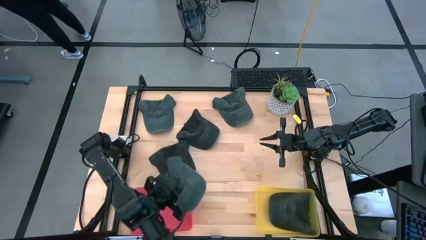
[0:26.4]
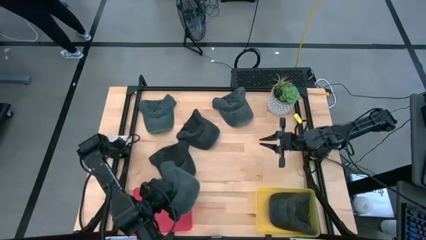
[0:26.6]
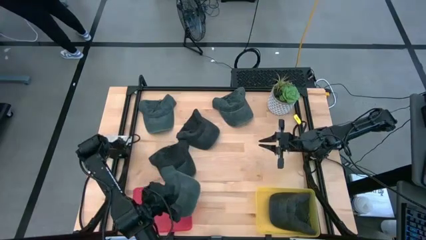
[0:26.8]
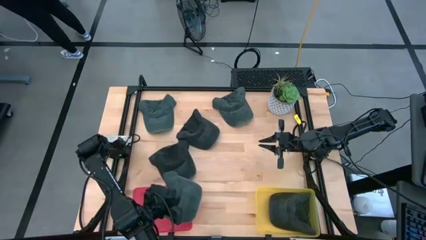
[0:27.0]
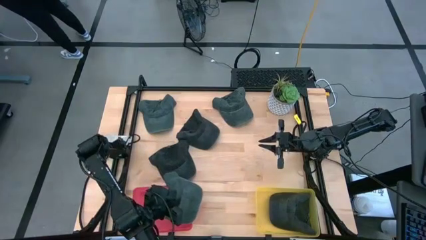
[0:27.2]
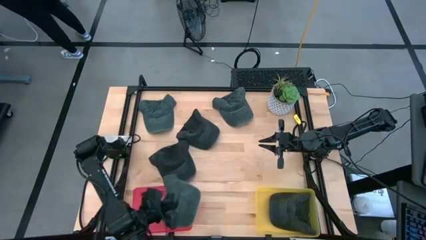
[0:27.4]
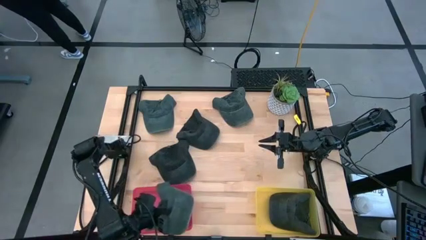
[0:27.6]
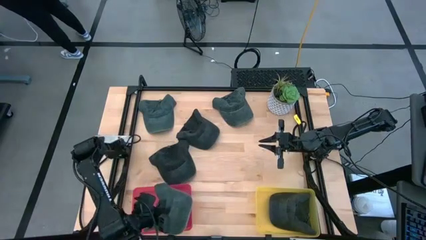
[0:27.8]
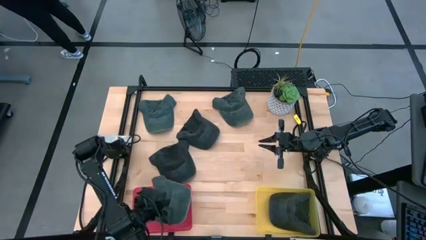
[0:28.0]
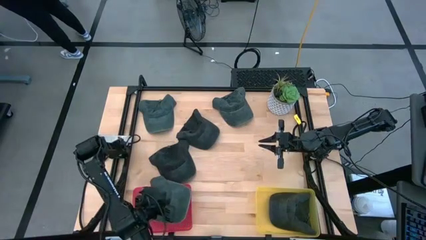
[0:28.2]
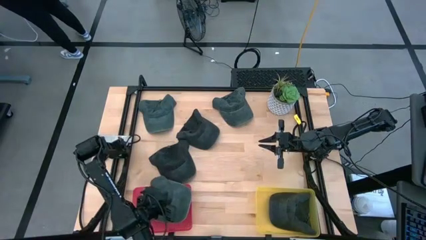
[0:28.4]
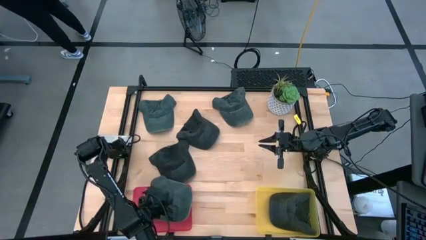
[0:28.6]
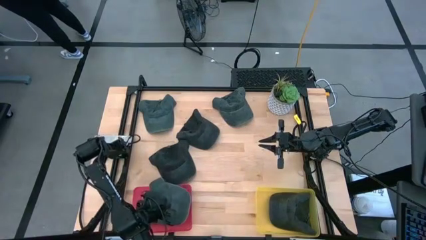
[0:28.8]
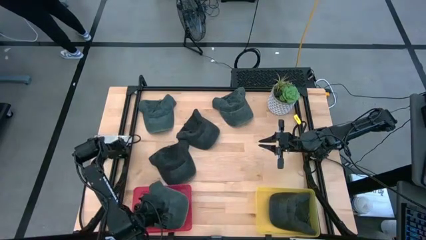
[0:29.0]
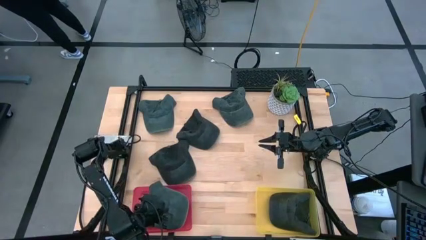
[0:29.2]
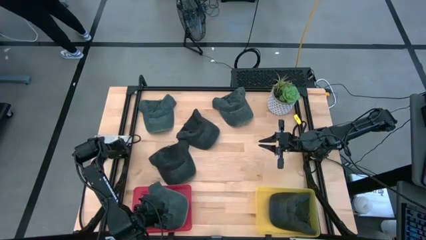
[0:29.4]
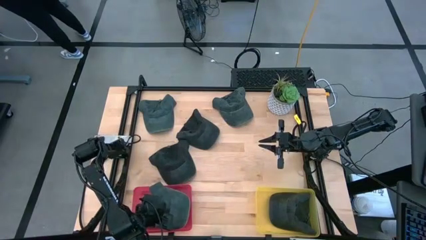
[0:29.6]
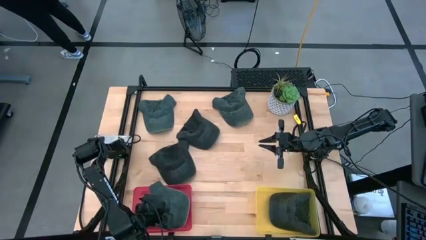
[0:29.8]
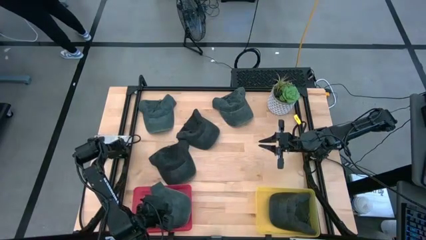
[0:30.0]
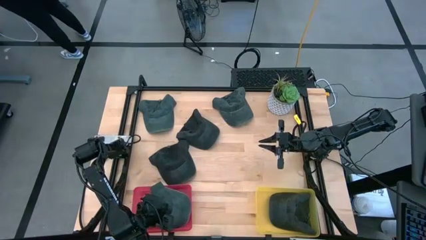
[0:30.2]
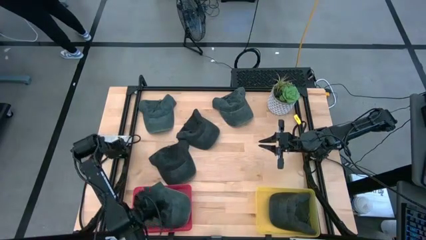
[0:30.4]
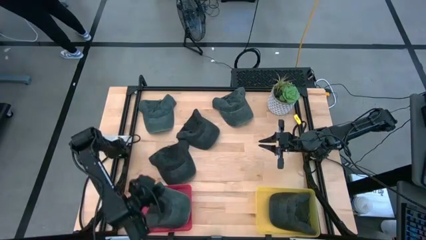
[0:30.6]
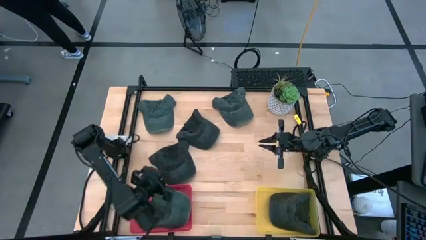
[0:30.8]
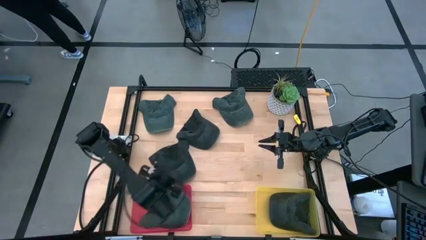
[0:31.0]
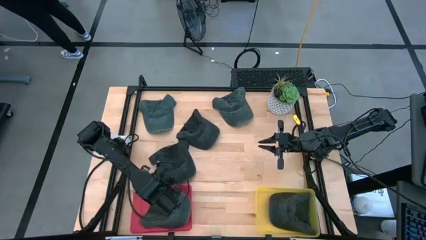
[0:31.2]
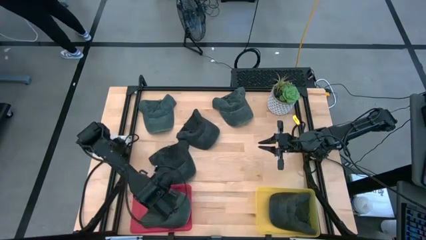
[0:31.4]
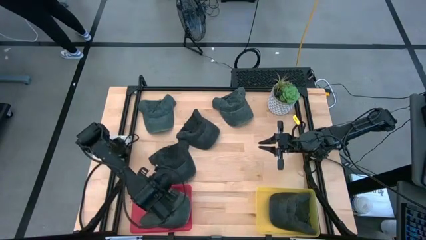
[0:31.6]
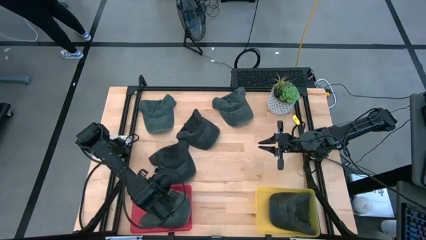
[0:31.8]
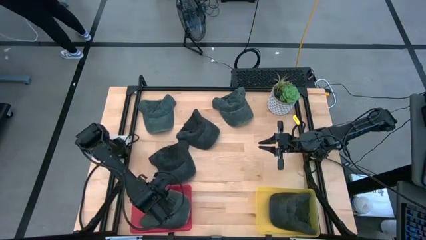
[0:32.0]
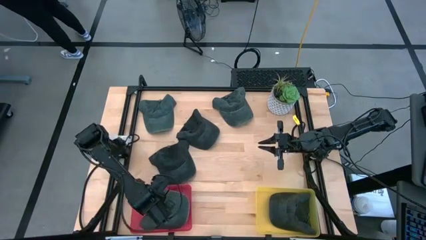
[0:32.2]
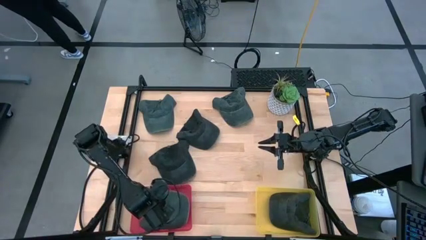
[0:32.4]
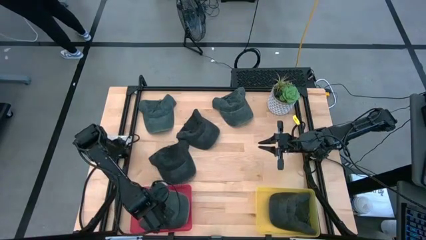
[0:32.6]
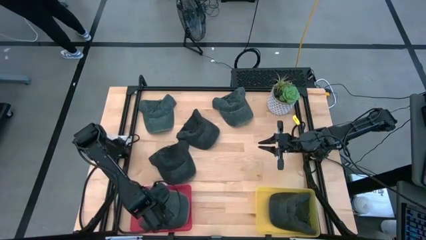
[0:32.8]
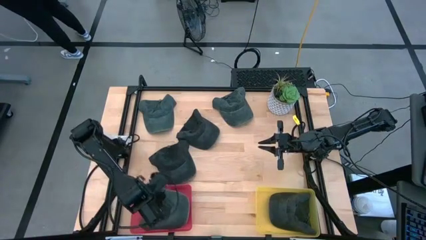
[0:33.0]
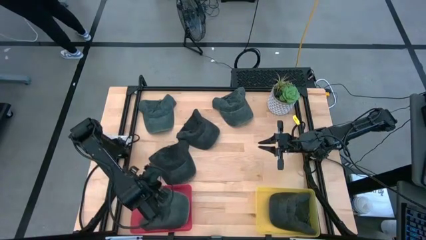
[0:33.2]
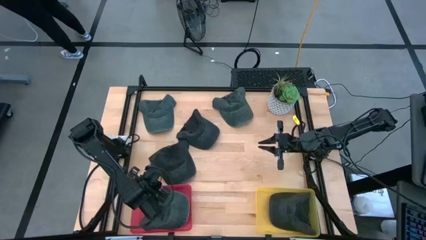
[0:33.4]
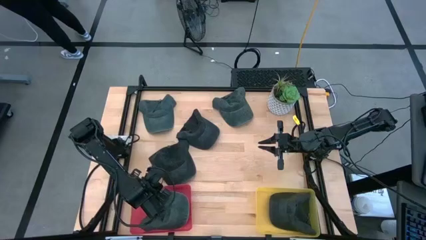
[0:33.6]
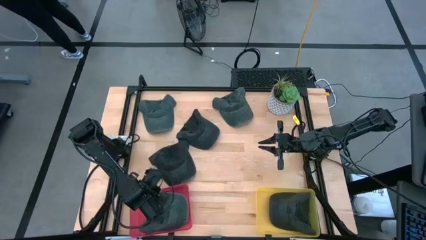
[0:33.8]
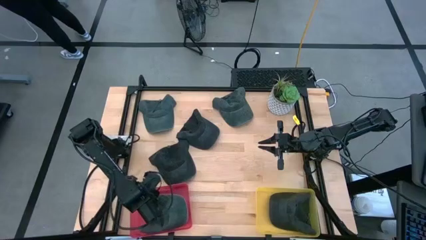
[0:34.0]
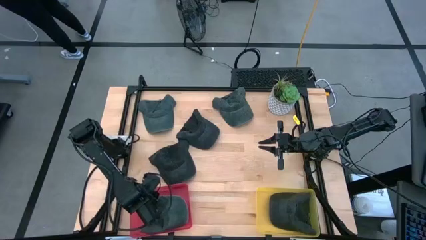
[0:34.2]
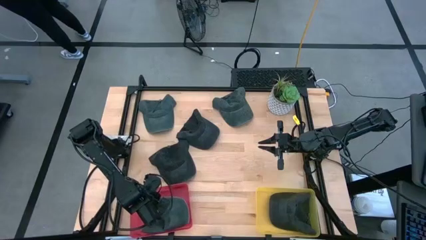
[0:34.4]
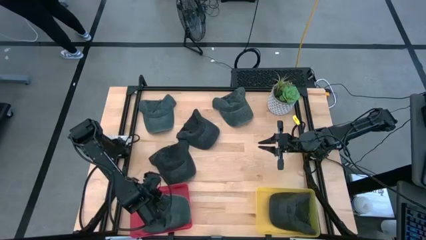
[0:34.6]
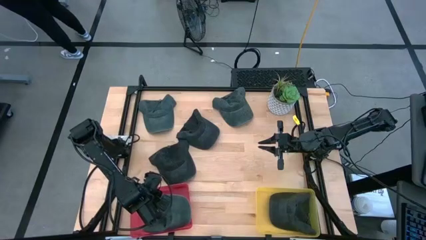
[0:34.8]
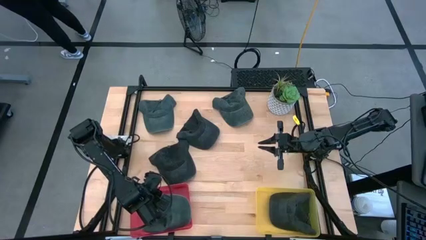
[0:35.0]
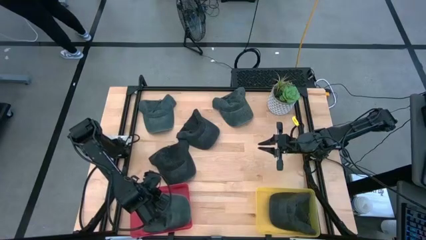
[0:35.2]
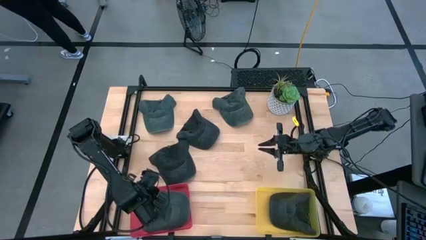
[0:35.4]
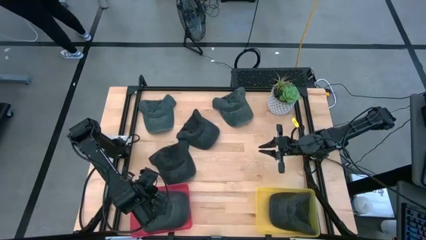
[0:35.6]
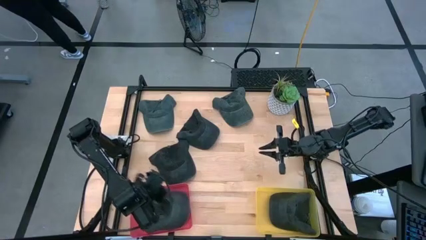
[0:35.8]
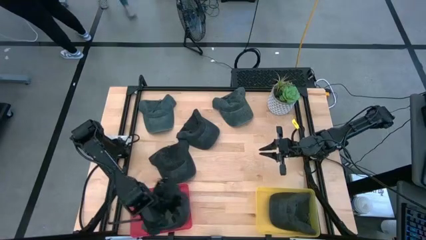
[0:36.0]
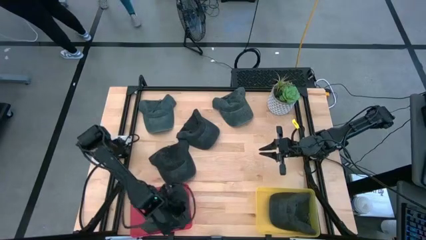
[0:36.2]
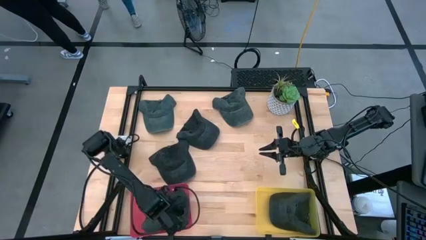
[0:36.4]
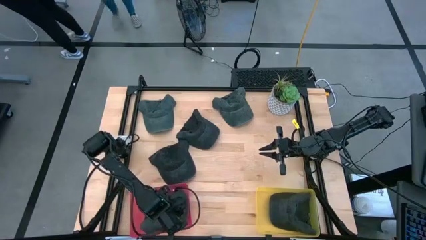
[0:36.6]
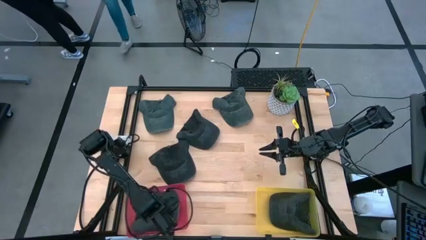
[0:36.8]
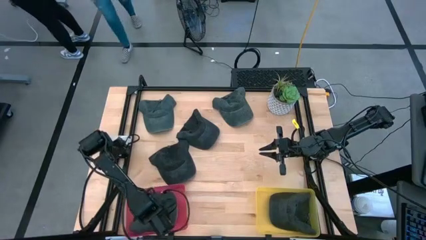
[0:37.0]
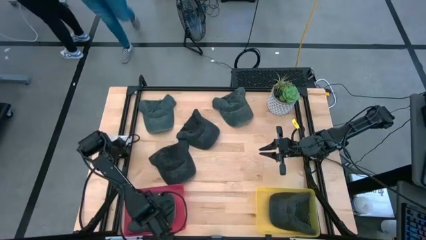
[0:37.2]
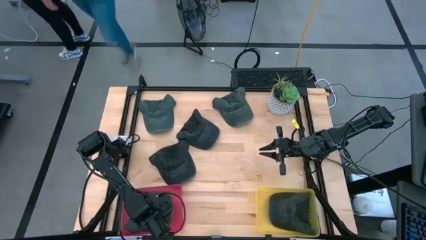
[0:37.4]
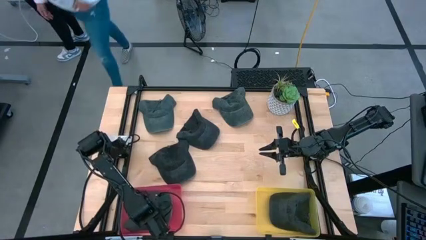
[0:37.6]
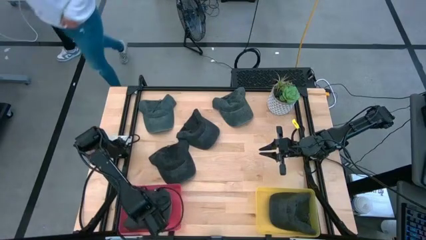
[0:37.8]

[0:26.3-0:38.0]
Task: Pick & Place hat
Put the grey cap into the pink bin

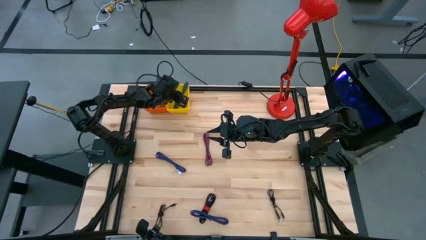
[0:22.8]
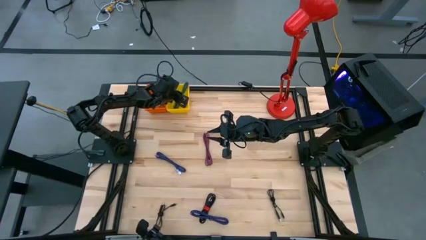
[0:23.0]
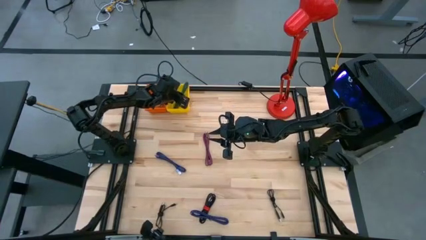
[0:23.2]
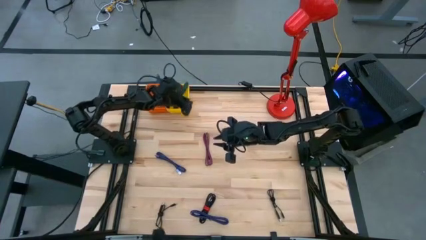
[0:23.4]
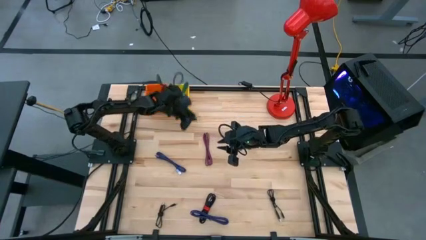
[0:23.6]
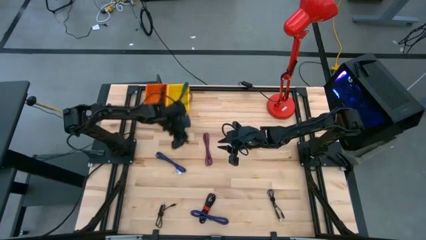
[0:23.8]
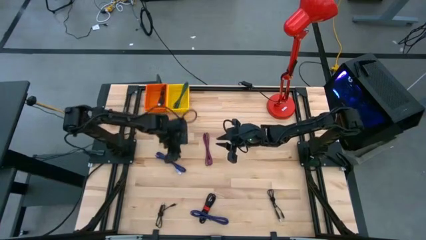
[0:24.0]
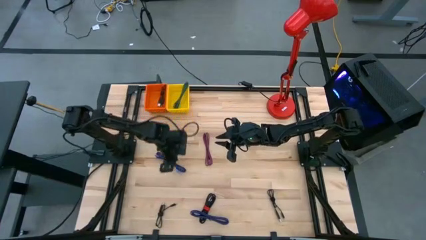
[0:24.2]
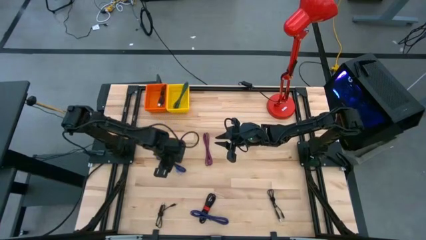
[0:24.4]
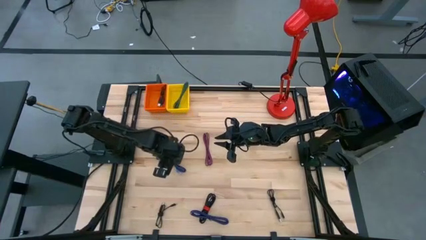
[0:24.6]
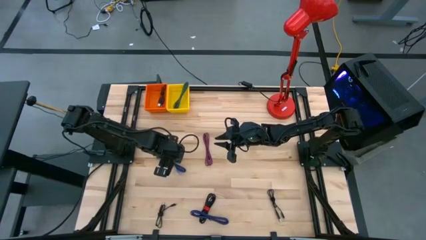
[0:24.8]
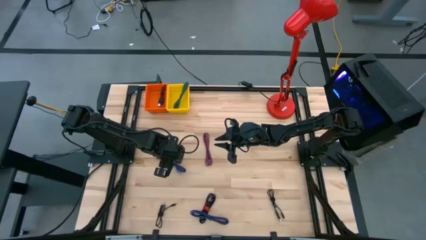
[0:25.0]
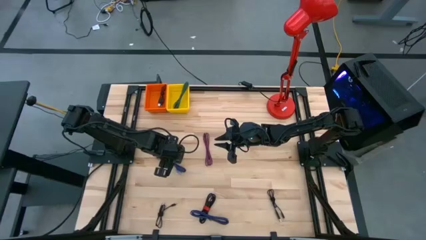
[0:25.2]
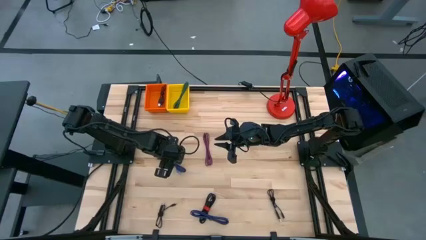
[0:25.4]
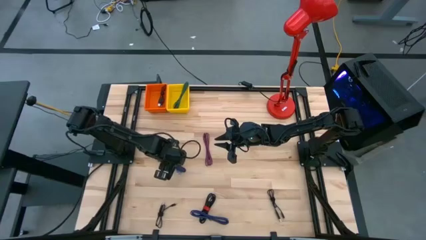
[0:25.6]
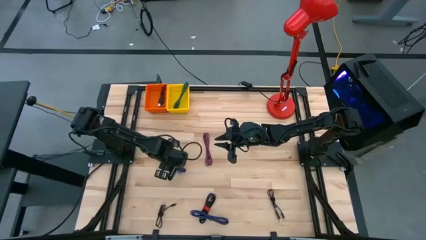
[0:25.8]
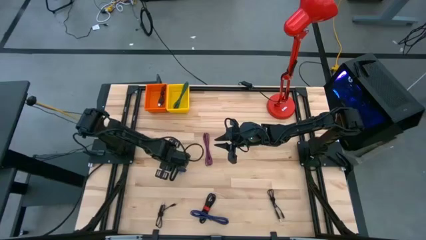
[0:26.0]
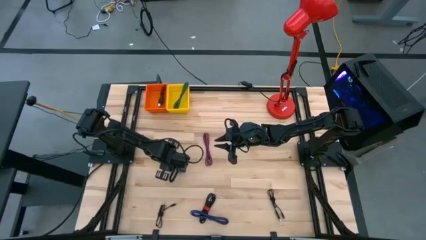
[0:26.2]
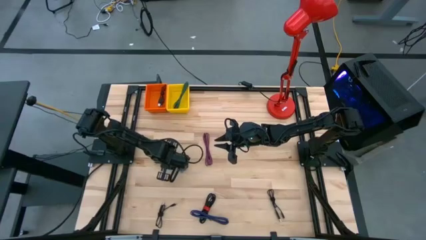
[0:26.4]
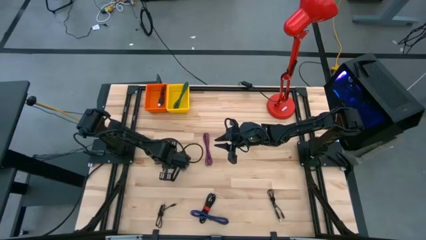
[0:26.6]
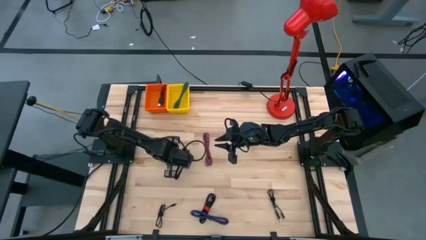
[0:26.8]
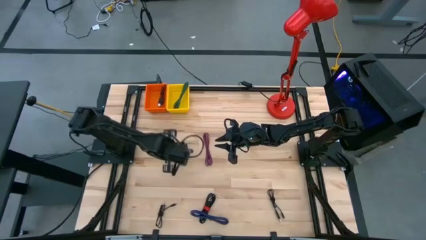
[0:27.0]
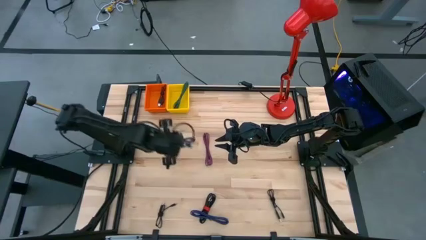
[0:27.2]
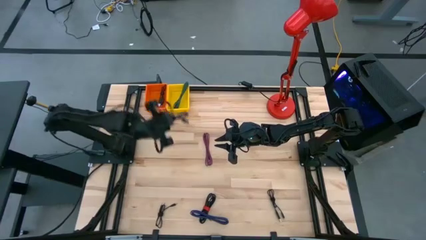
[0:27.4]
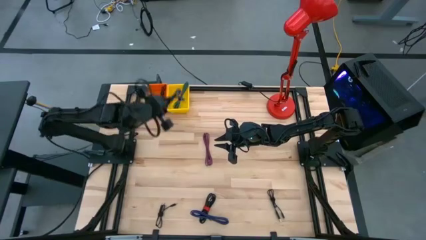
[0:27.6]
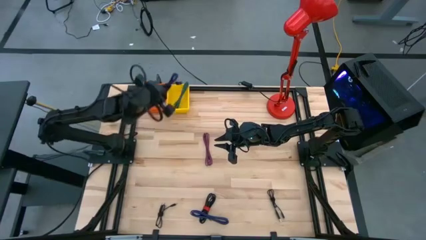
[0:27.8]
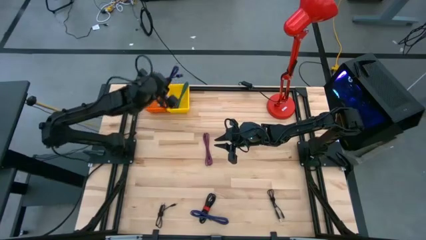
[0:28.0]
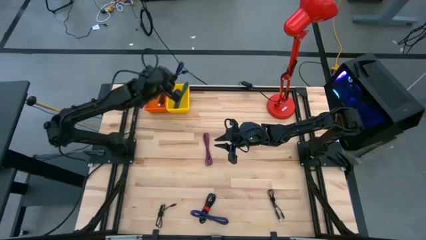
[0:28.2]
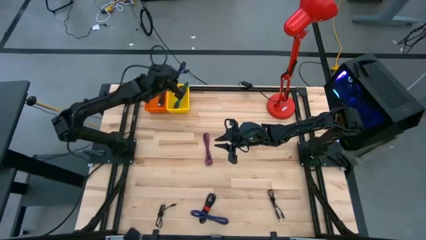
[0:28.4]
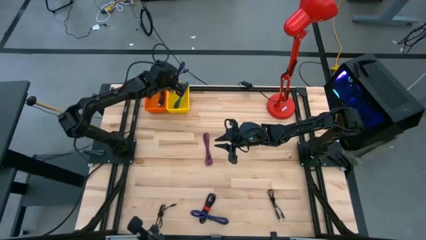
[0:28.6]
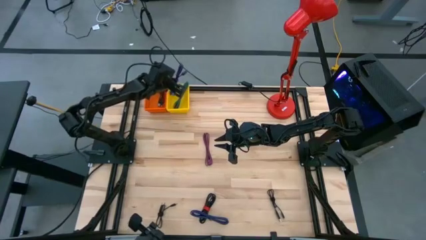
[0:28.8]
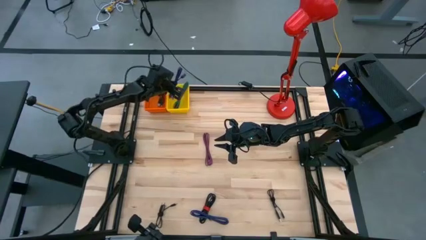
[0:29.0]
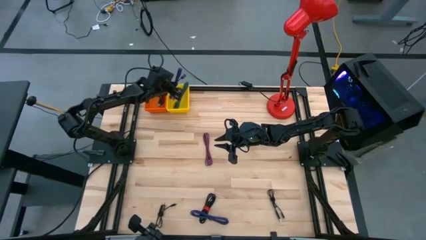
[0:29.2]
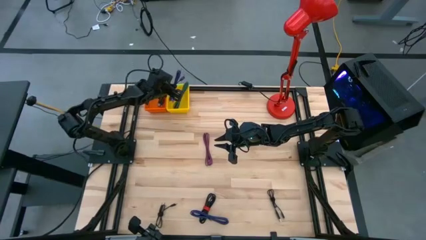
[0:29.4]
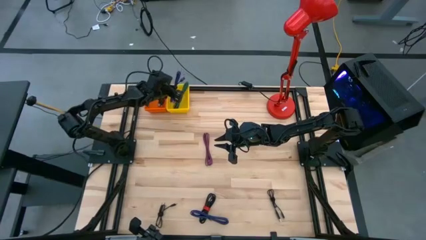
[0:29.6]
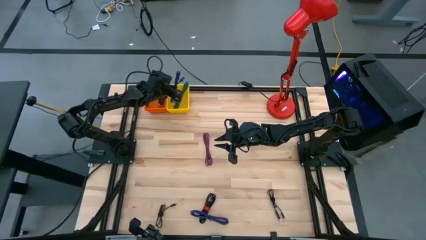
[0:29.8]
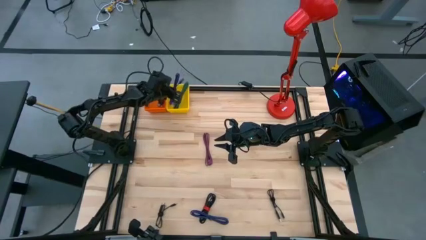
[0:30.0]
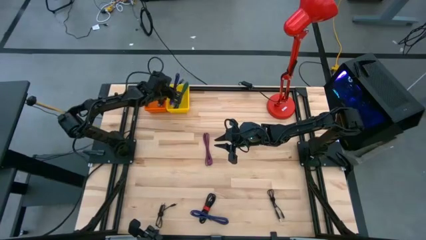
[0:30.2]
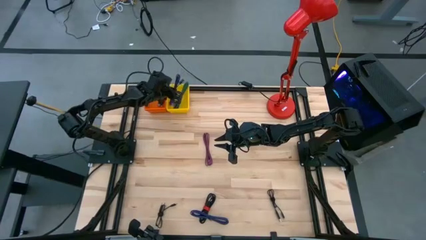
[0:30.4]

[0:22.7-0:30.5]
Task: Pick & Place USB Port
Put the black and blue USB cable into the yellow bin
